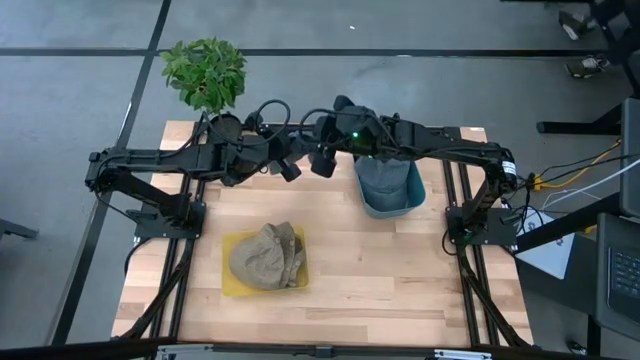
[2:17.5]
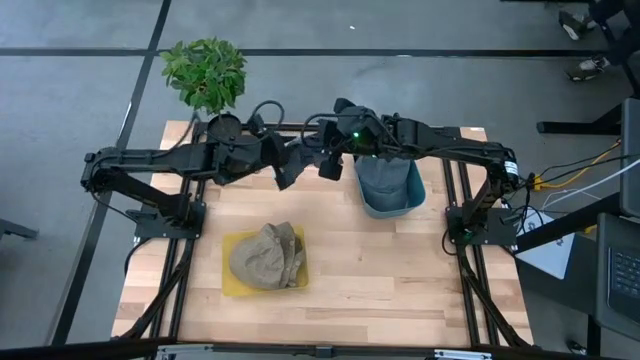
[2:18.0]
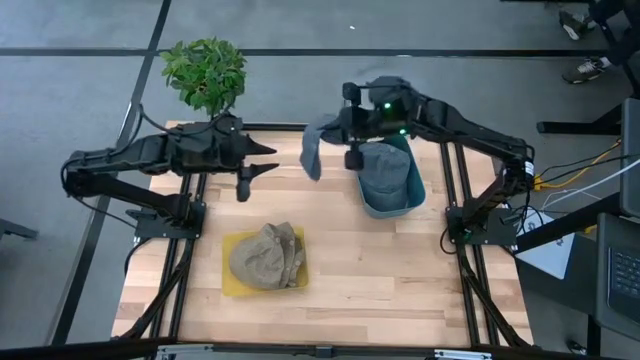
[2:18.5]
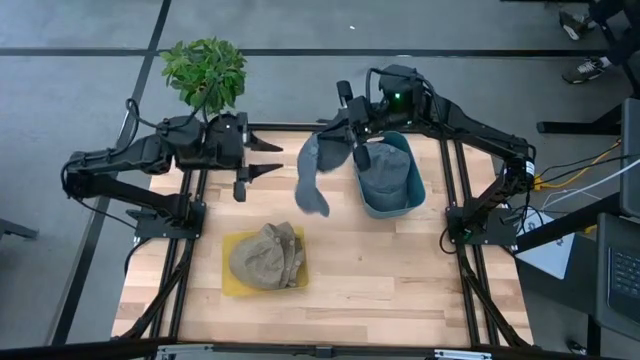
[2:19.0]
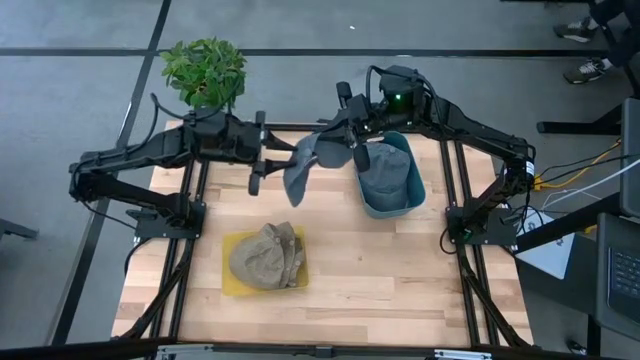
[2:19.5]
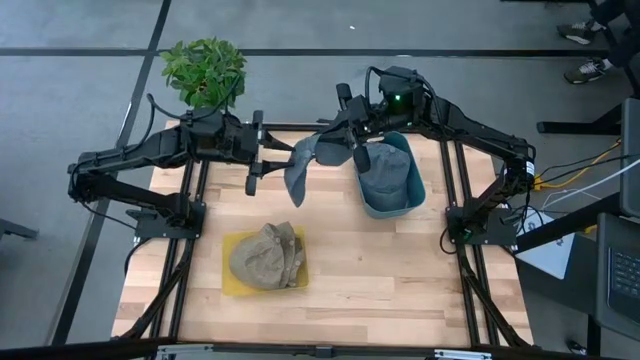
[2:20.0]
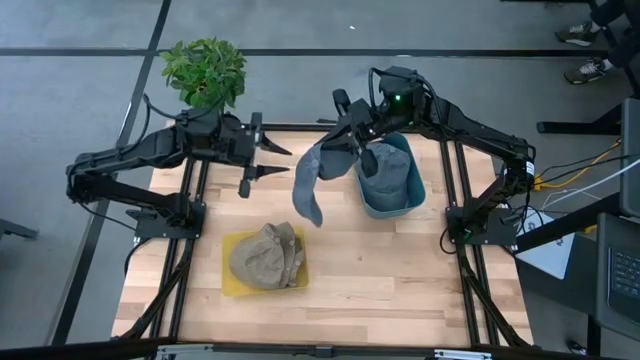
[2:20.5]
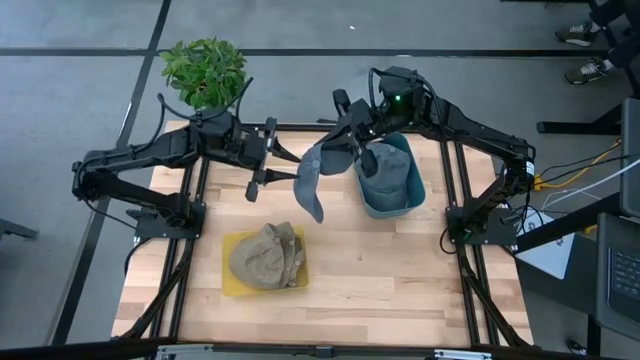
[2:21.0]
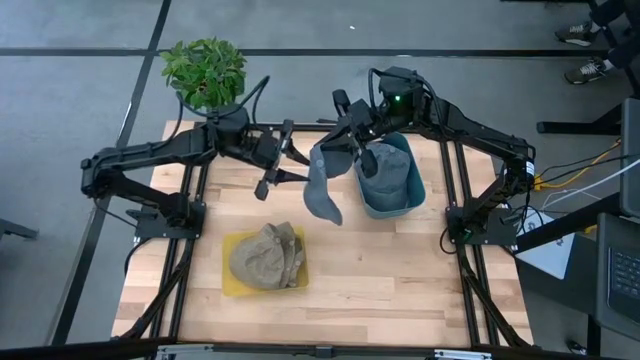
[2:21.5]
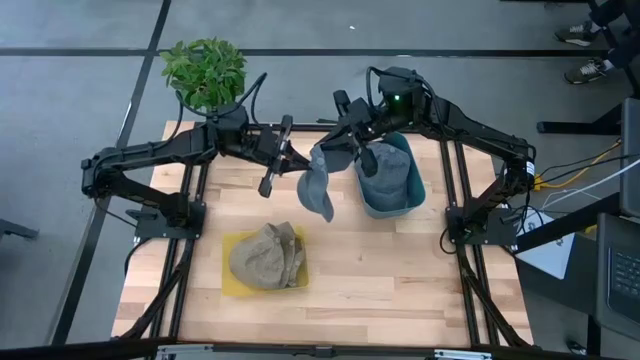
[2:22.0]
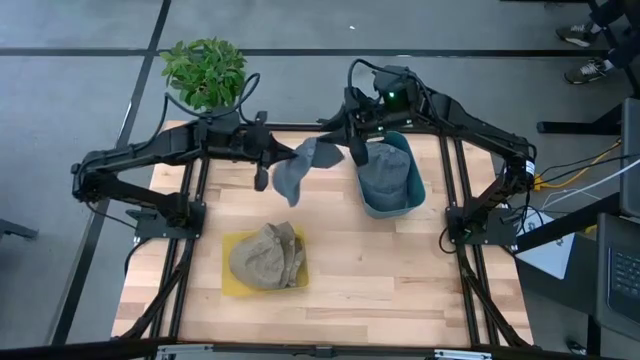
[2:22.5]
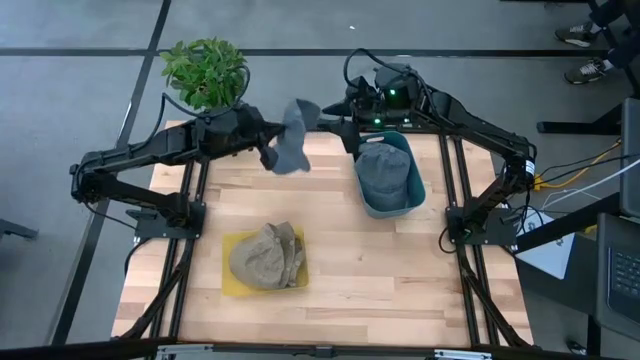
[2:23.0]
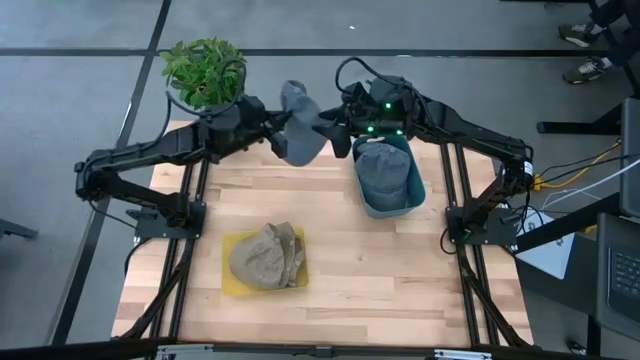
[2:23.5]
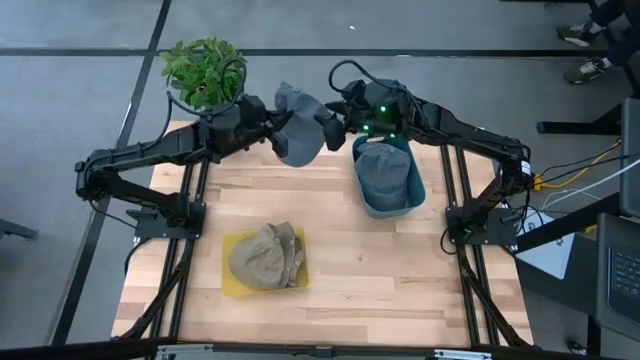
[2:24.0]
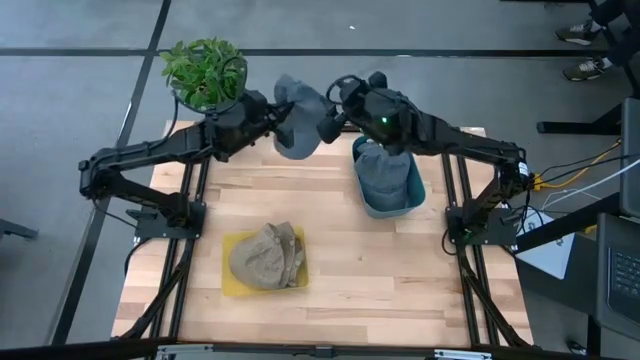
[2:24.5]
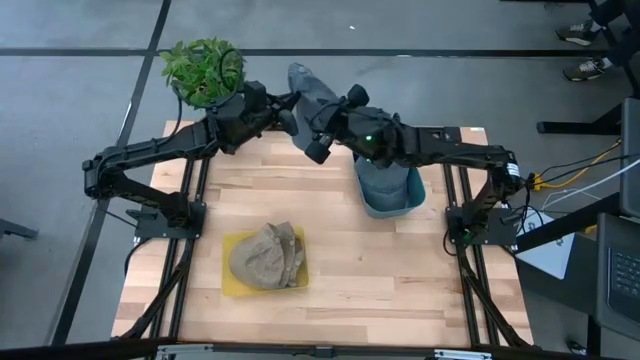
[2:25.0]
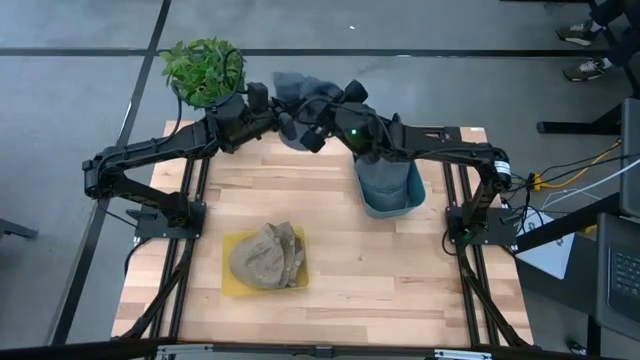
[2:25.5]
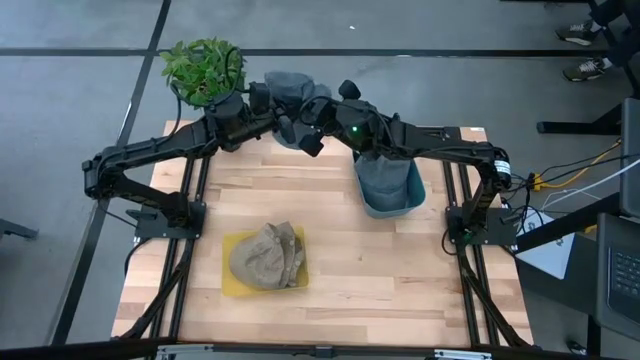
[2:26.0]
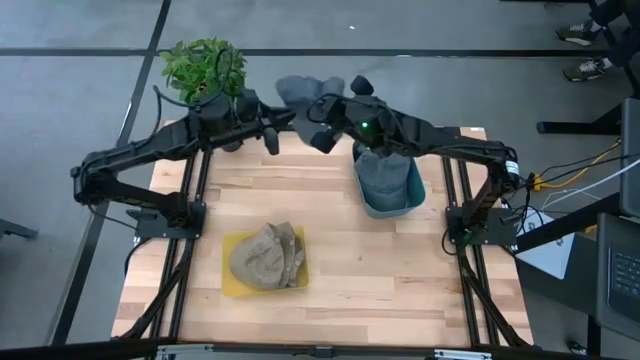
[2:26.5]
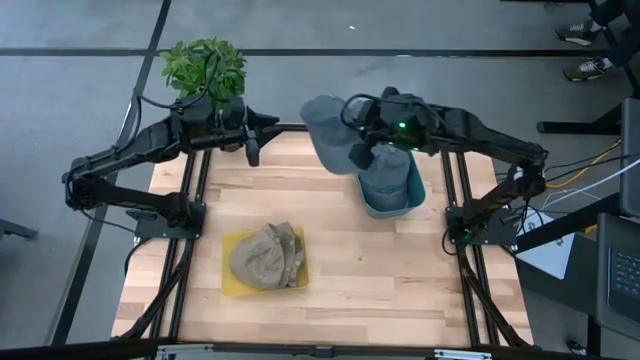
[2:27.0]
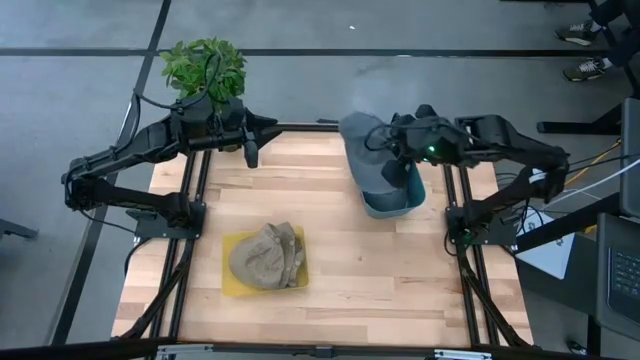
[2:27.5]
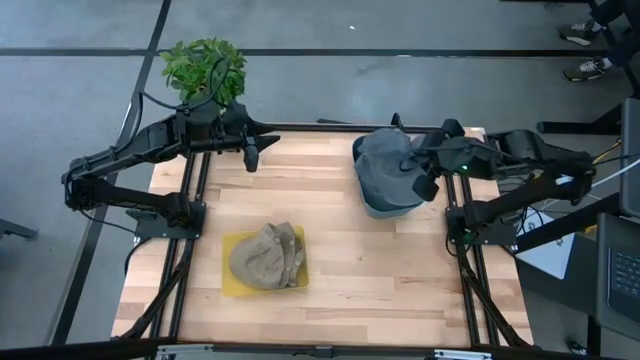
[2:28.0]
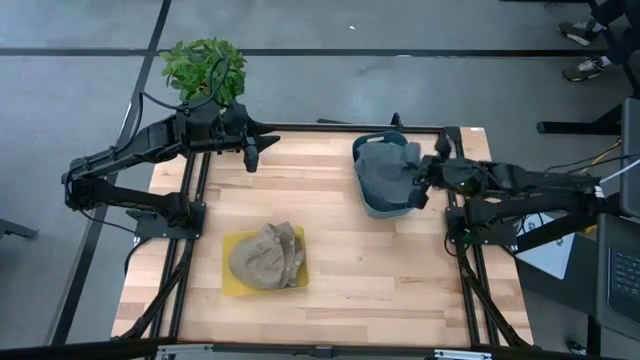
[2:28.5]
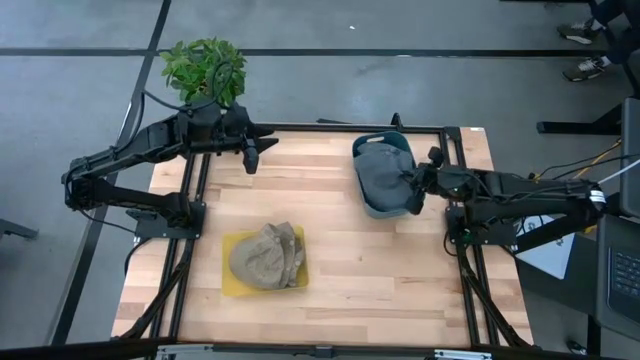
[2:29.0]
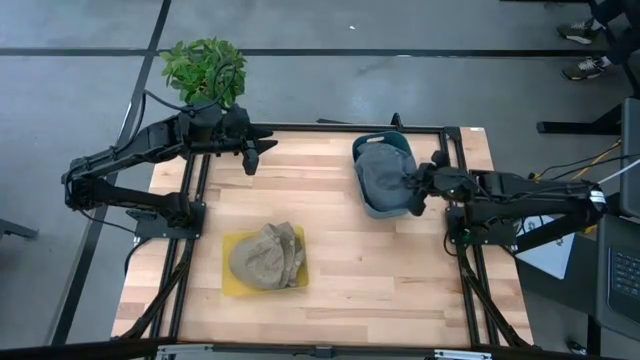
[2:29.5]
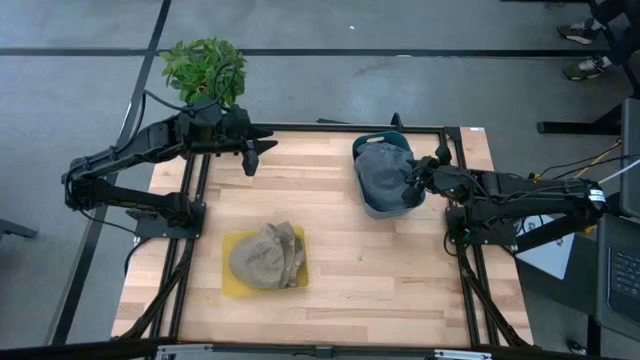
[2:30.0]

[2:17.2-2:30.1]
Task: Pick & Place hat
Put the gray cap into the blue bin

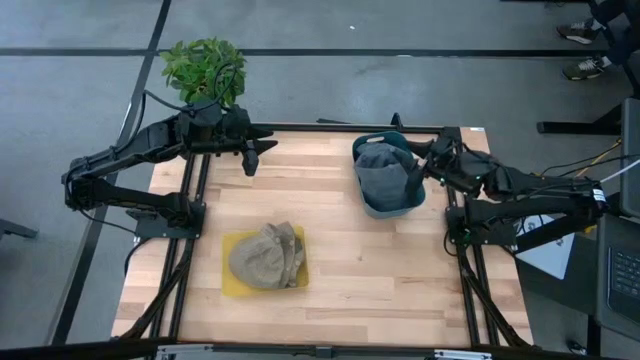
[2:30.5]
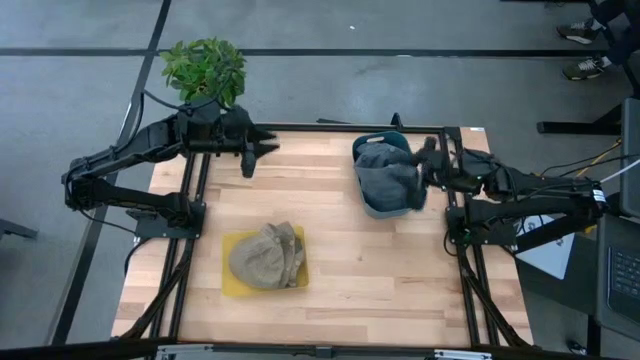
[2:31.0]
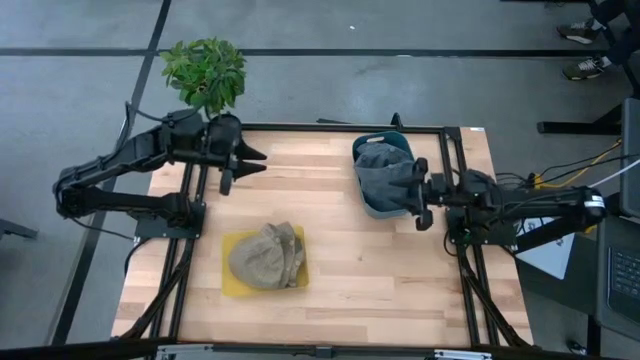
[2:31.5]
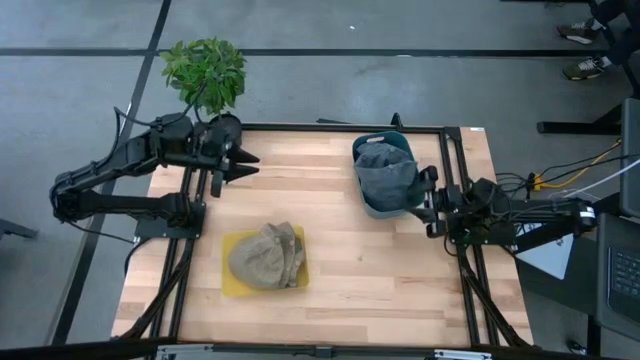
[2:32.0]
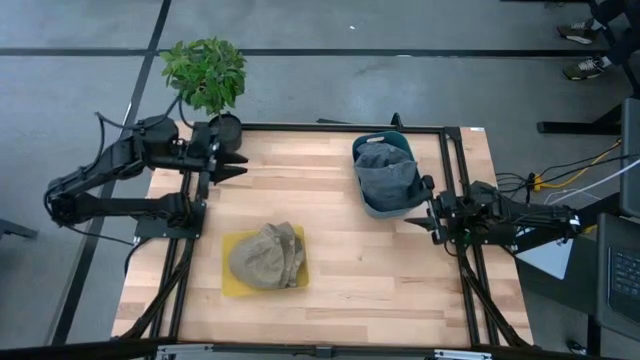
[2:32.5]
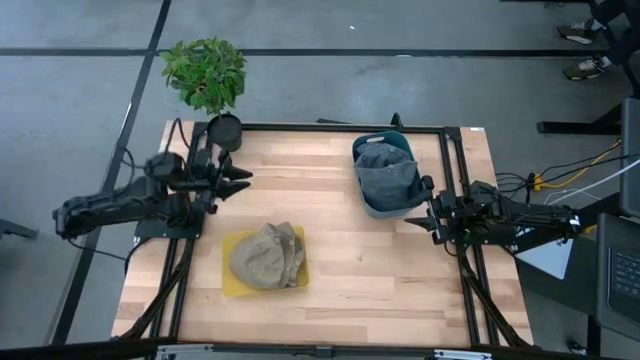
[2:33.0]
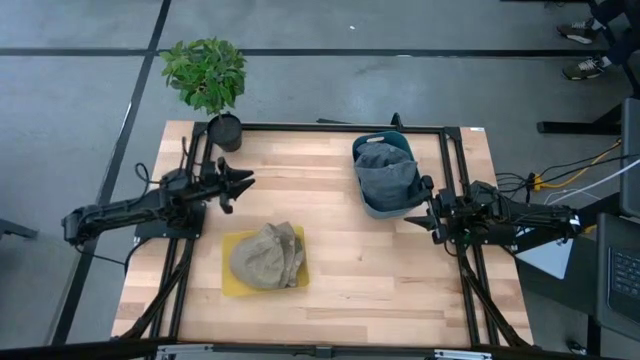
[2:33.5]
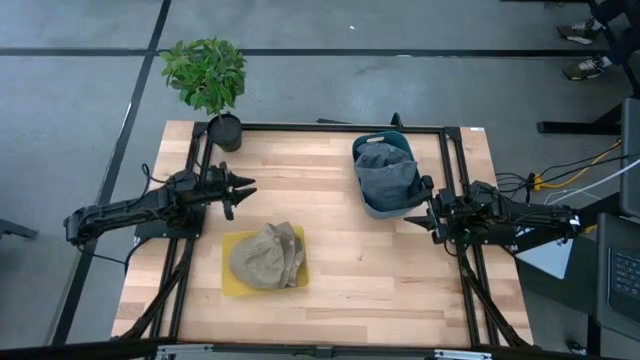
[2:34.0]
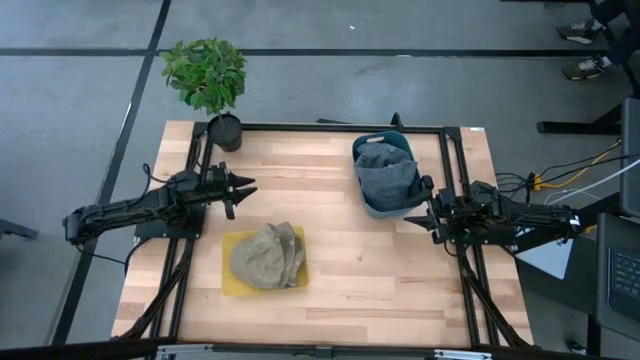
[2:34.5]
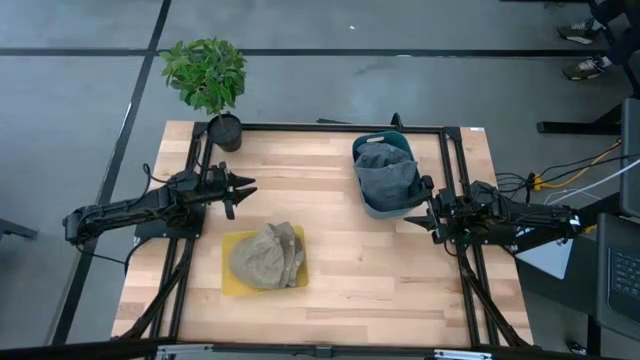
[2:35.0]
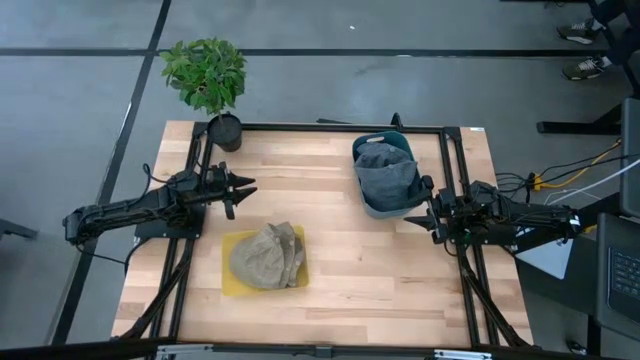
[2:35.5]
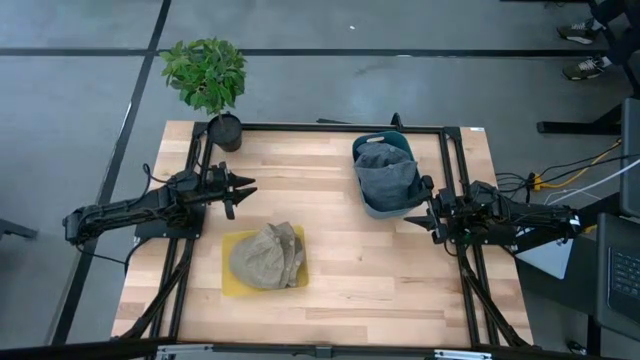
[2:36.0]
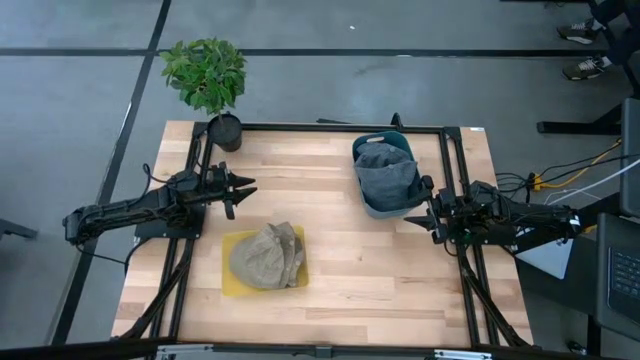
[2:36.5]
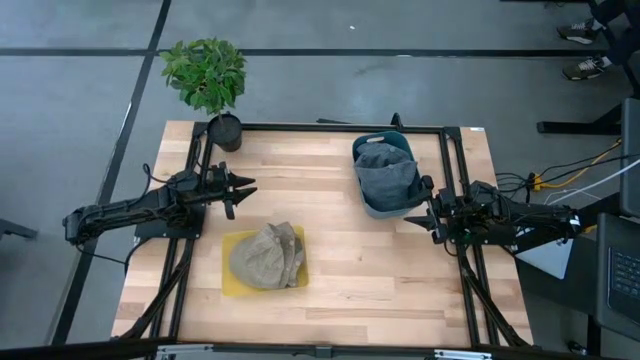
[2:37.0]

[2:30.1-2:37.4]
Return to Home Position

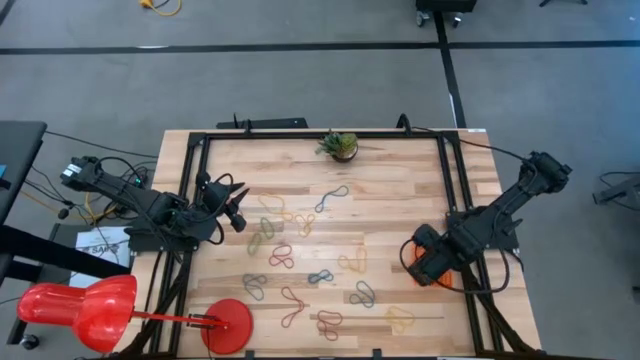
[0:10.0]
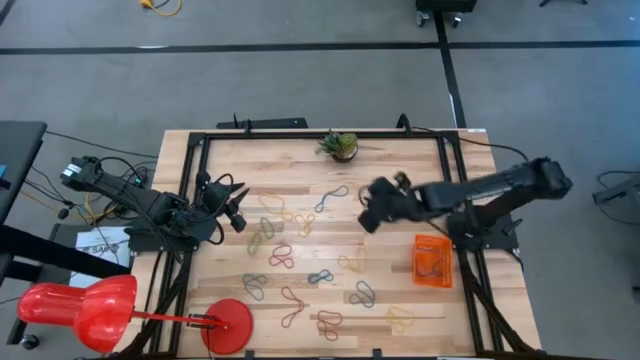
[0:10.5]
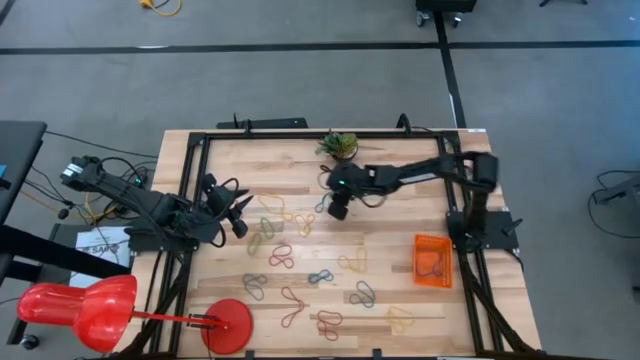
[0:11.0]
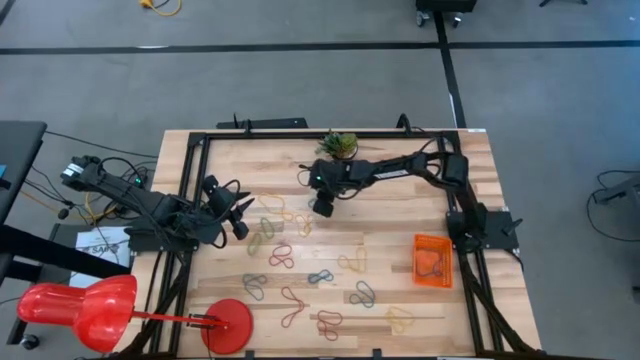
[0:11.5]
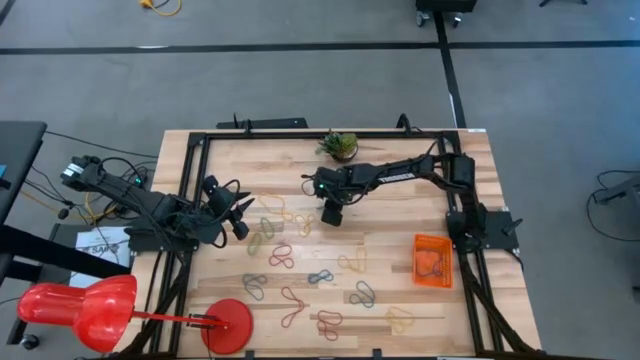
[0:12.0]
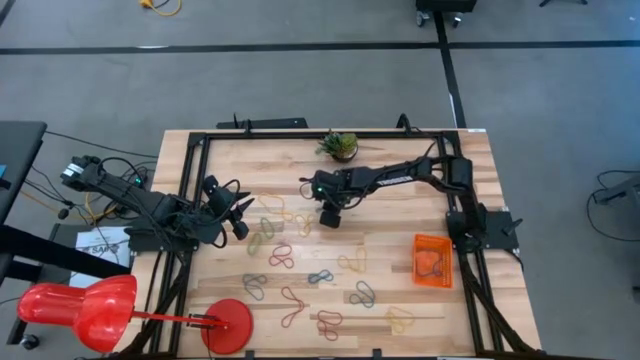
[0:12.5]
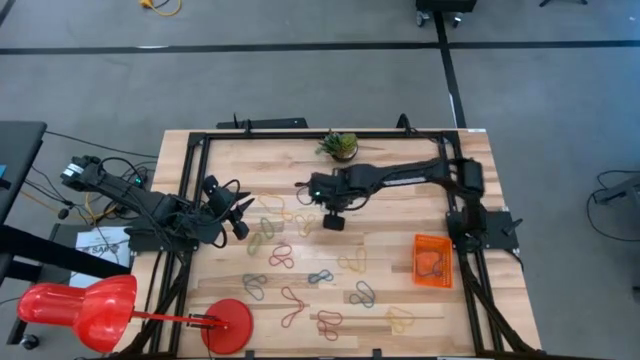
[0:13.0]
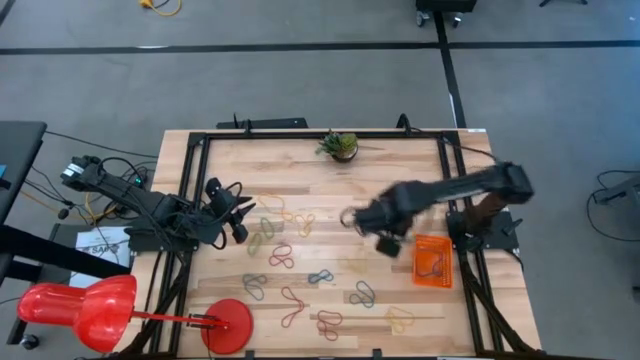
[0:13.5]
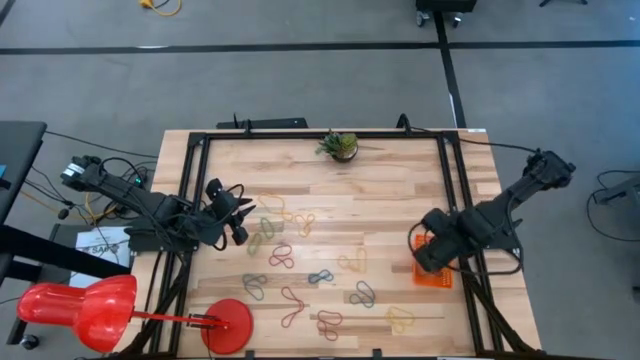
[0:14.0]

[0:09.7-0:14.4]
Task: Pick and place rubber bands into bin
Put the blue rubber band into the orange basket
